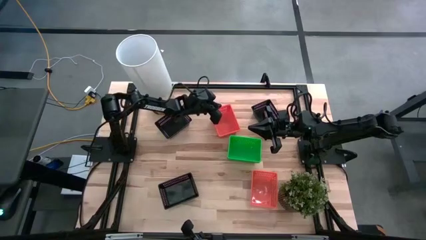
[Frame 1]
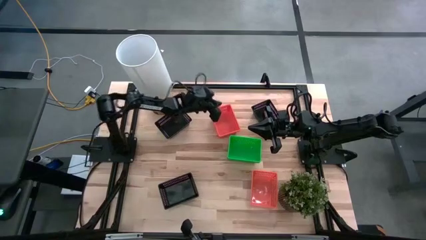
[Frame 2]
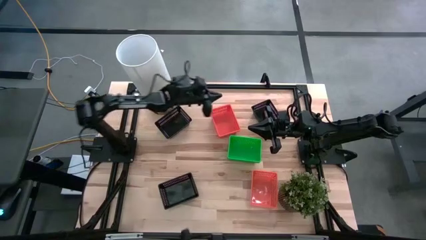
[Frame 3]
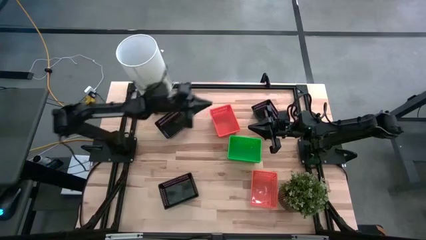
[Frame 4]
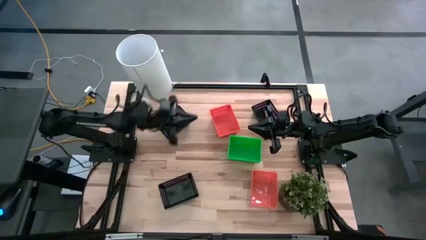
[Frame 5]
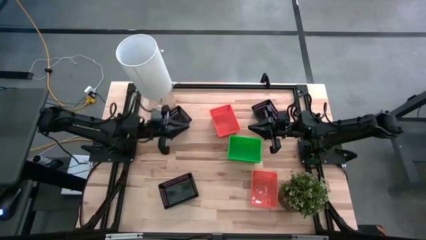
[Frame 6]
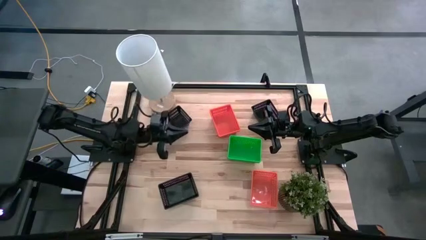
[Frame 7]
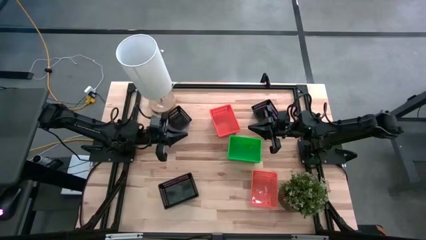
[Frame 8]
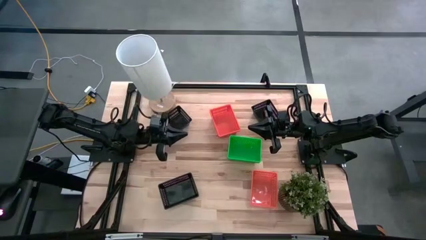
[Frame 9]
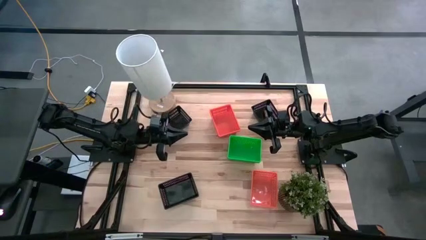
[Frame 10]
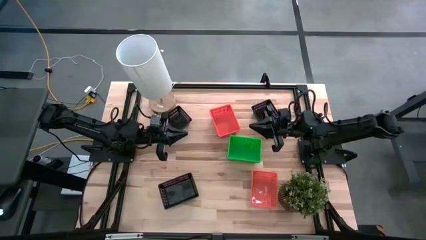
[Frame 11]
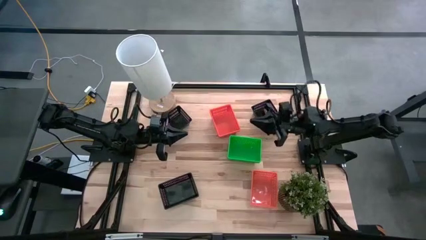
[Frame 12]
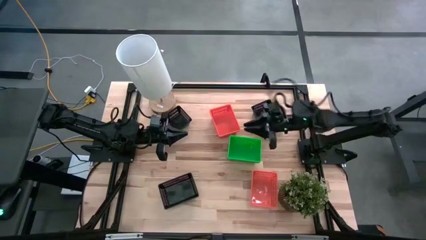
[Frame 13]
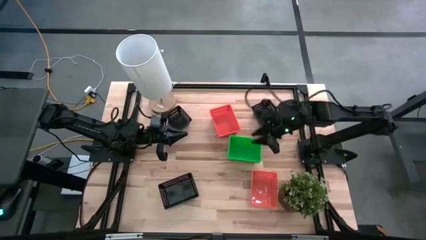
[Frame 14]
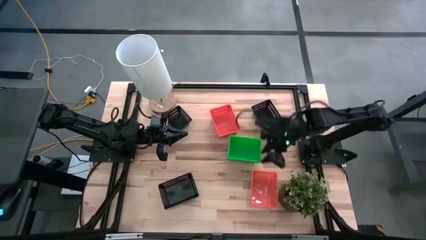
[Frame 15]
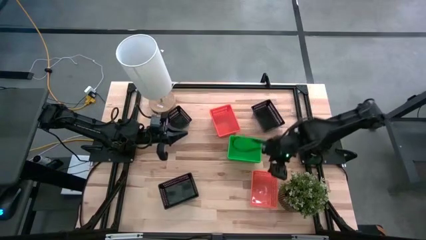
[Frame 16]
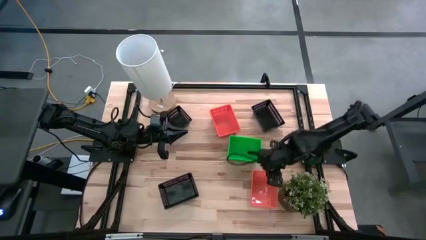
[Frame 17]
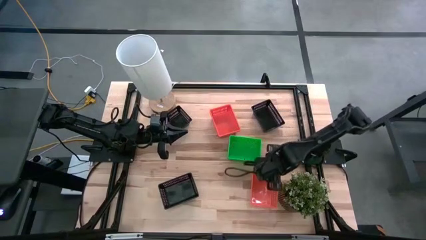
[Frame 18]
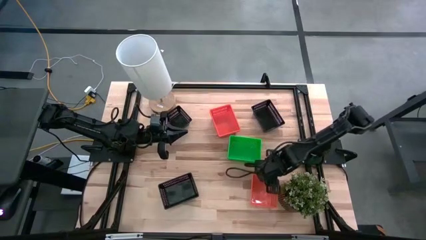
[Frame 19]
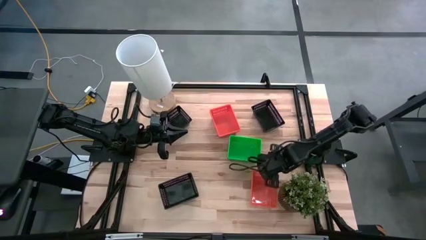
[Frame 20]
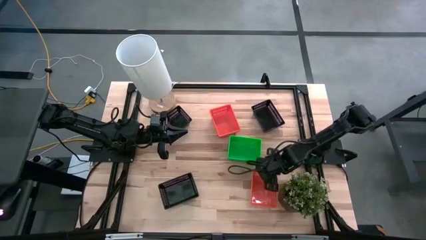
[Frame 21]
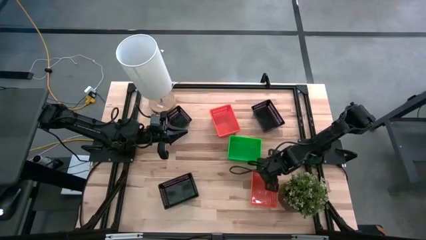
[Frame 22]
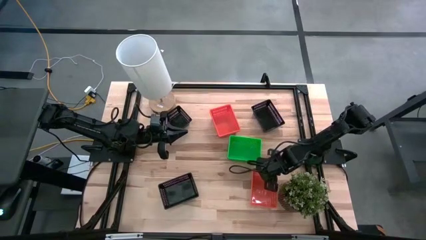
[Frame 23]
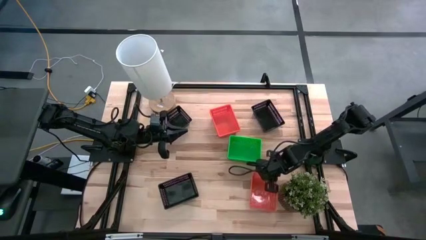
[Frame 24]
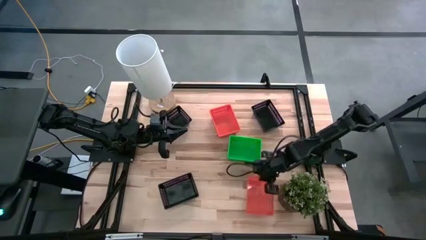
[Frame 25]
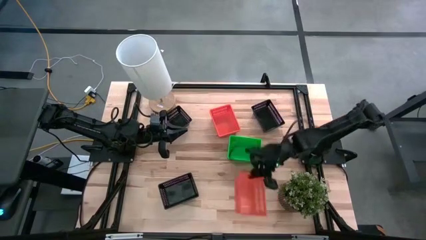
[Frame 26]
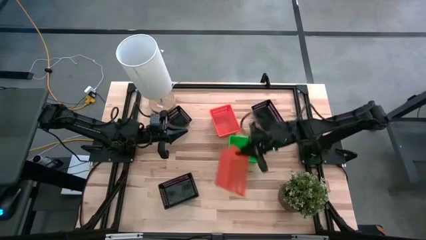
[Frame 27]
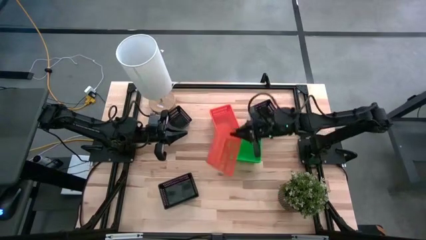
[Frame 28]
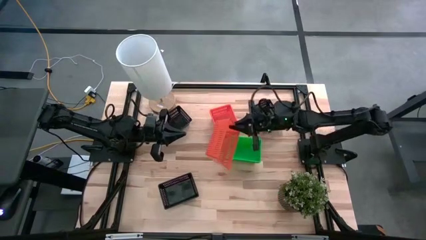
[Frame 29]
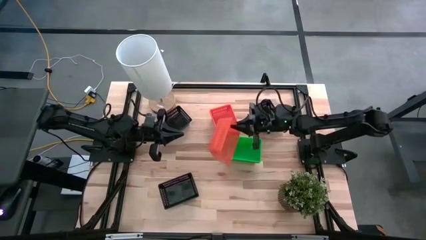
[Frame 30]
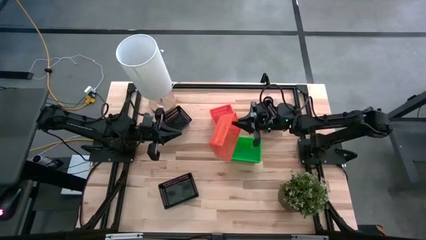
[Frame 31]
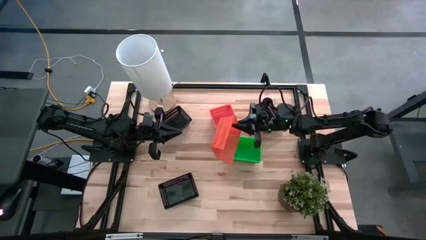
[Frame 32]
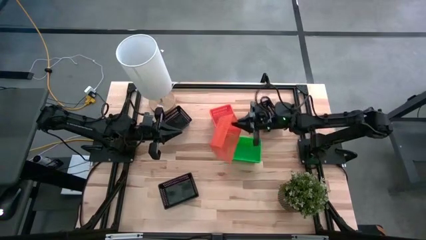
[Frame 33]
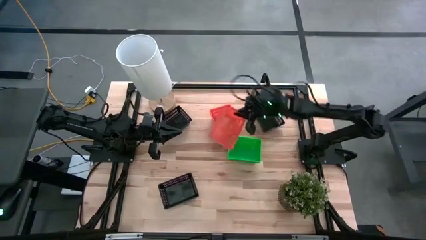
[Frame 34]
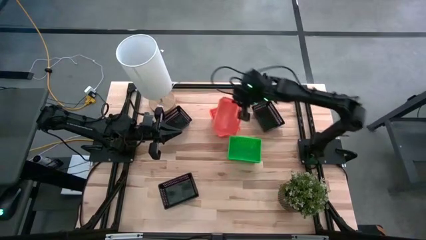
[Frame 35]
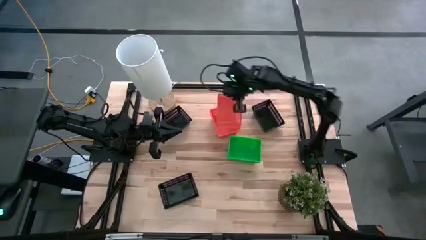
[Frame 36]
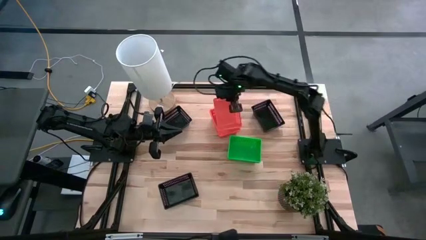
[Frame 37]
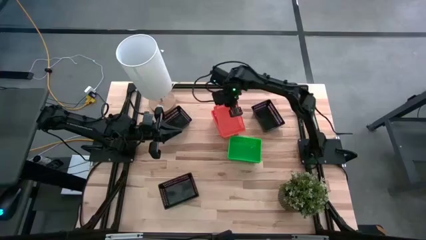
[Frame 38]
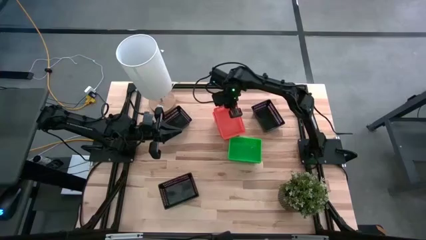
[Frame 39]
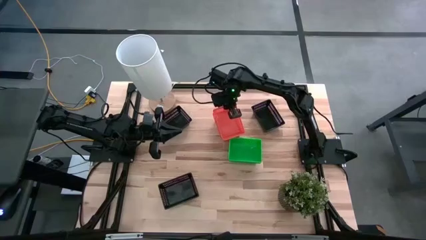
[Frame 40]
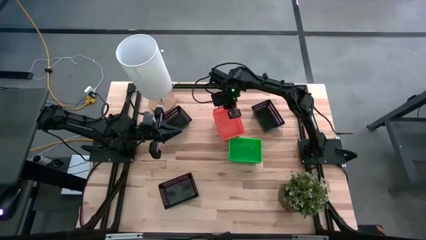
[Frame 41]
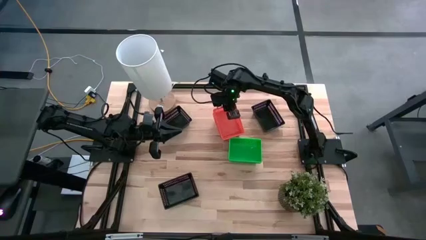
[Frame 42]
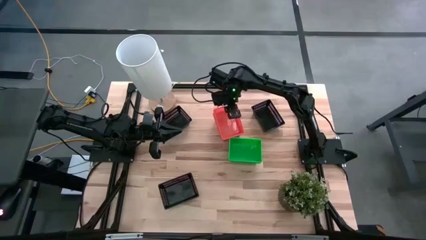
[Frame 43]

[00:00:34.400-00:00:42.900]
Stack the bottom orange bin on top of the top orange bin

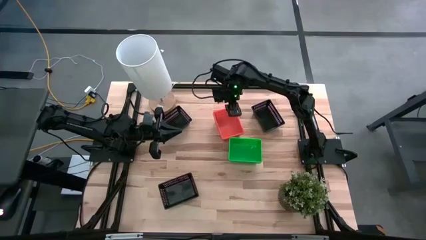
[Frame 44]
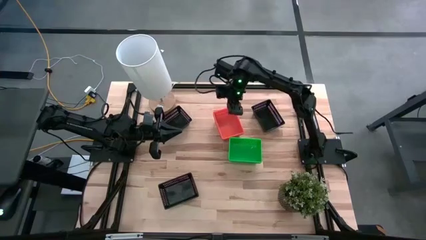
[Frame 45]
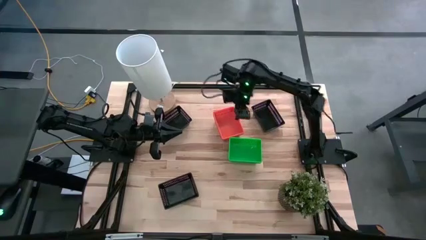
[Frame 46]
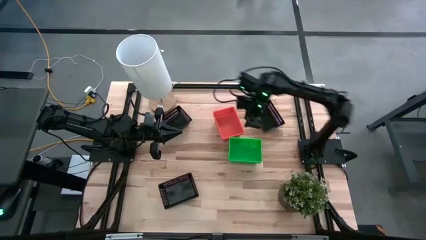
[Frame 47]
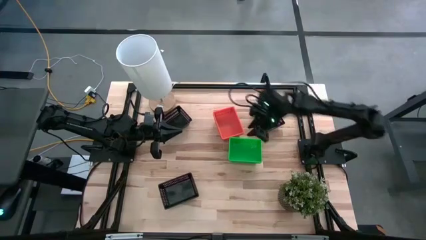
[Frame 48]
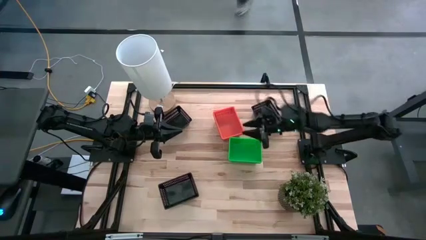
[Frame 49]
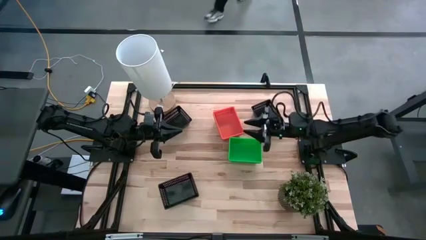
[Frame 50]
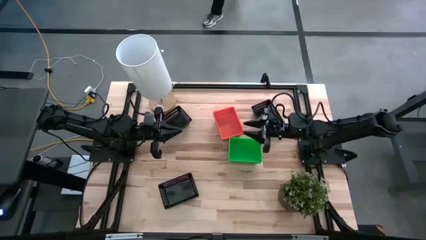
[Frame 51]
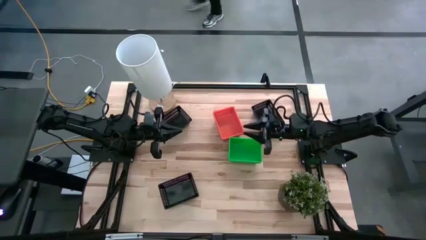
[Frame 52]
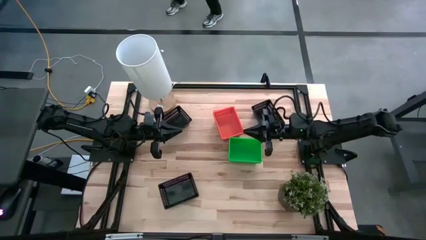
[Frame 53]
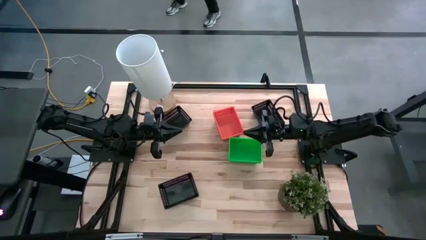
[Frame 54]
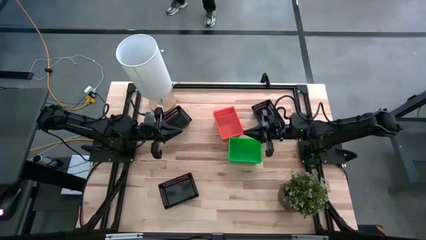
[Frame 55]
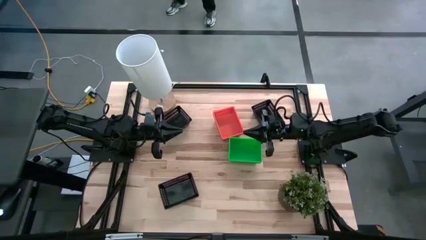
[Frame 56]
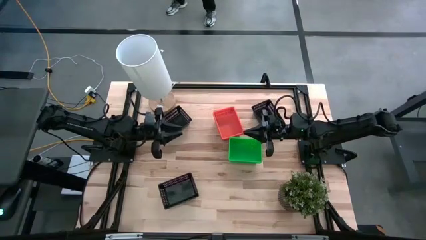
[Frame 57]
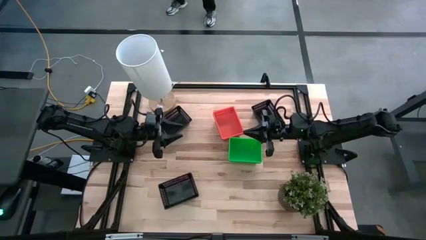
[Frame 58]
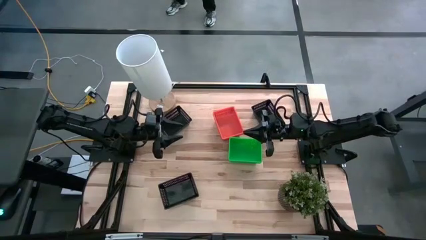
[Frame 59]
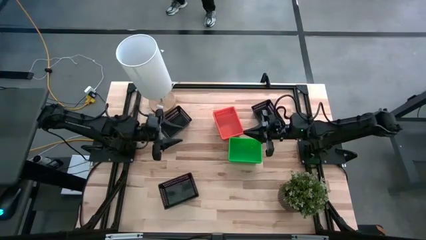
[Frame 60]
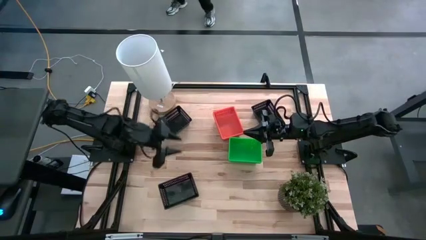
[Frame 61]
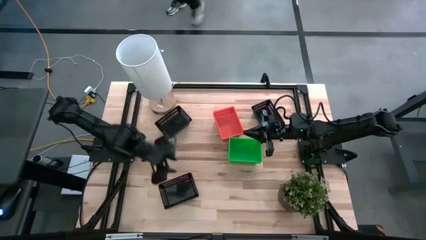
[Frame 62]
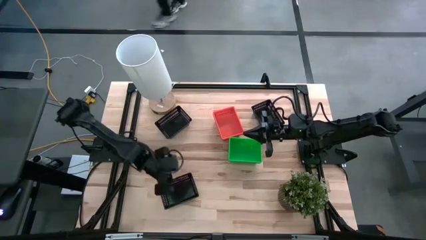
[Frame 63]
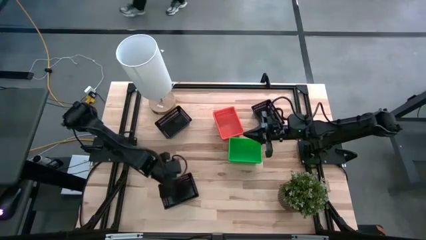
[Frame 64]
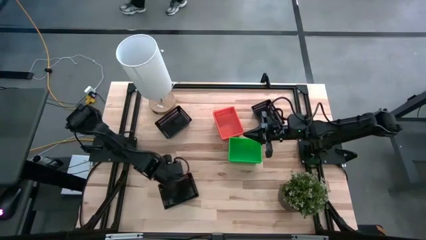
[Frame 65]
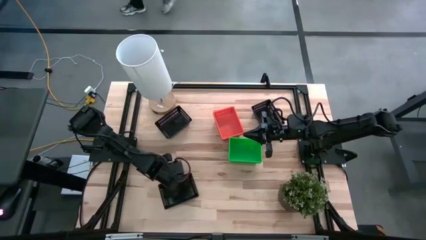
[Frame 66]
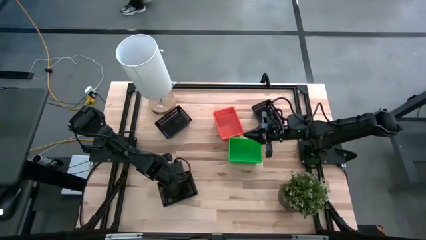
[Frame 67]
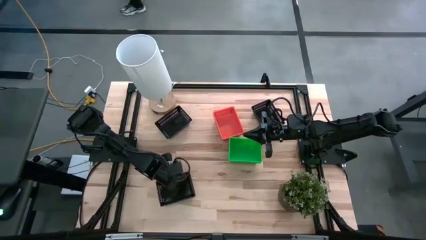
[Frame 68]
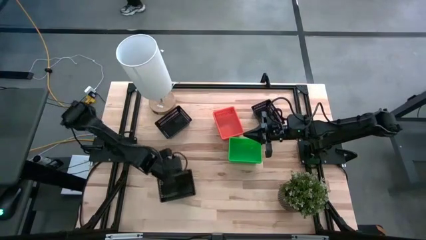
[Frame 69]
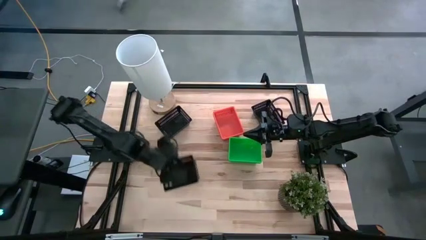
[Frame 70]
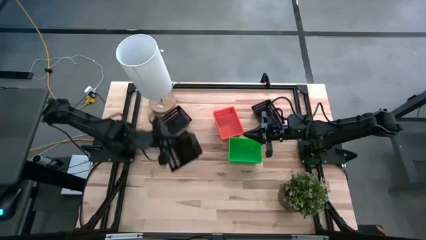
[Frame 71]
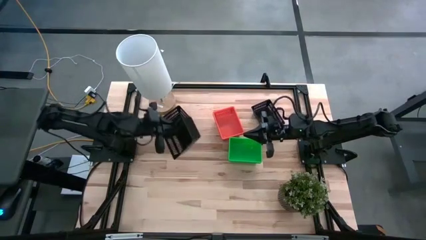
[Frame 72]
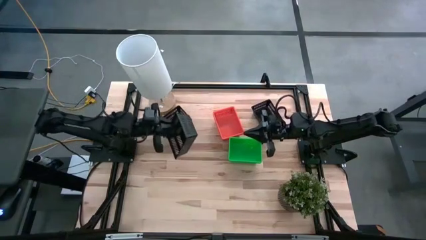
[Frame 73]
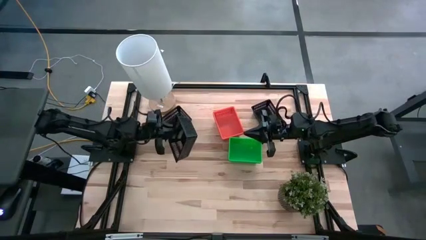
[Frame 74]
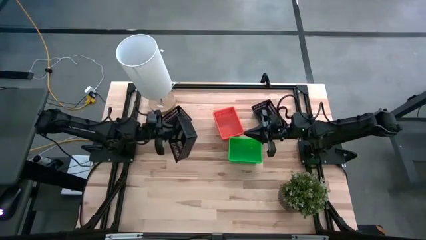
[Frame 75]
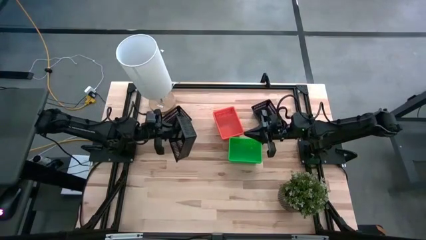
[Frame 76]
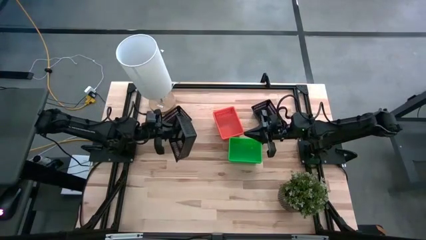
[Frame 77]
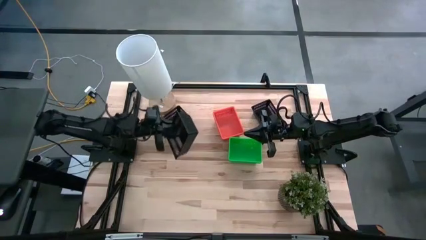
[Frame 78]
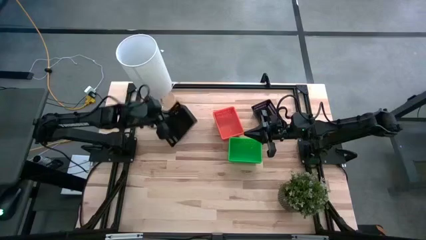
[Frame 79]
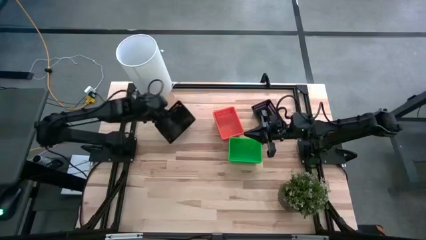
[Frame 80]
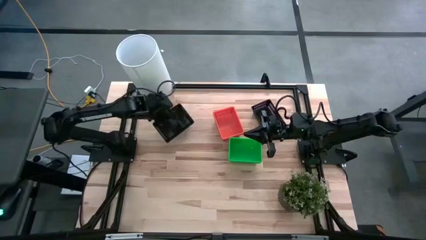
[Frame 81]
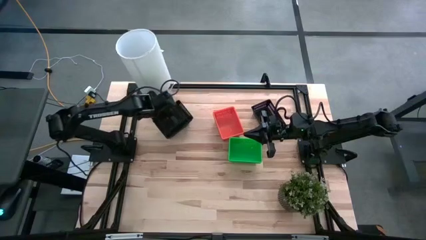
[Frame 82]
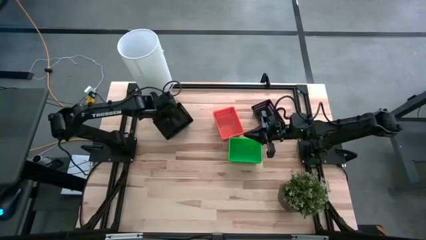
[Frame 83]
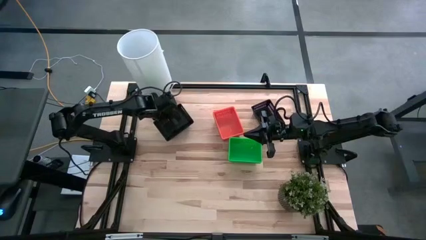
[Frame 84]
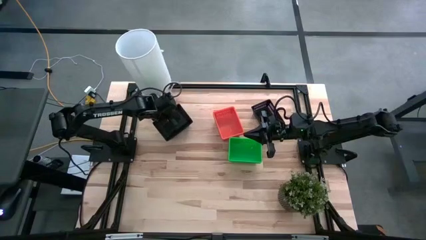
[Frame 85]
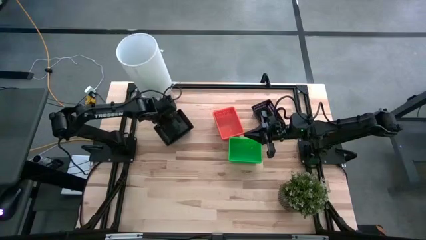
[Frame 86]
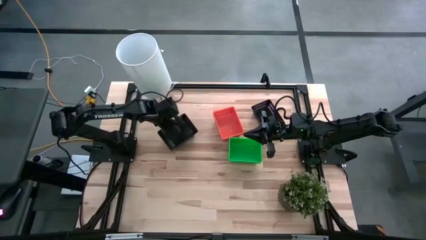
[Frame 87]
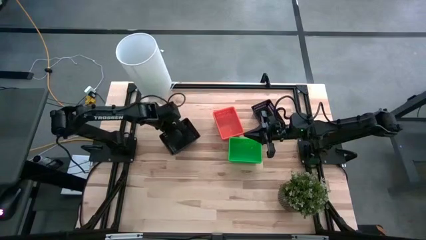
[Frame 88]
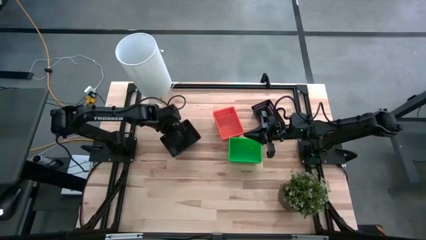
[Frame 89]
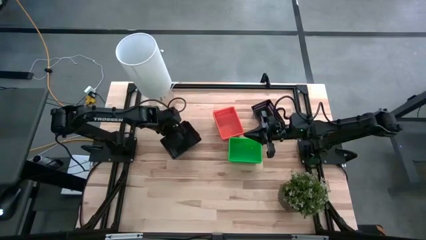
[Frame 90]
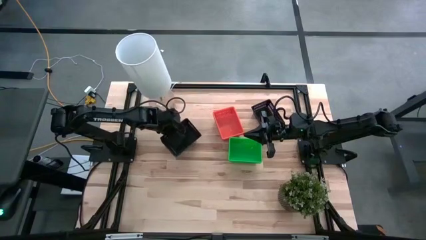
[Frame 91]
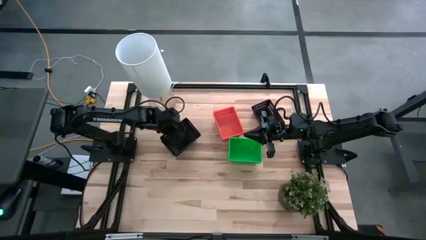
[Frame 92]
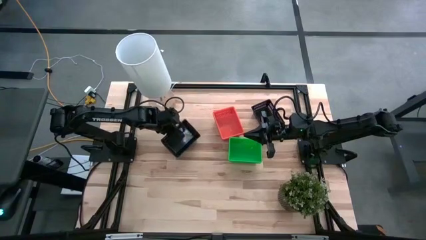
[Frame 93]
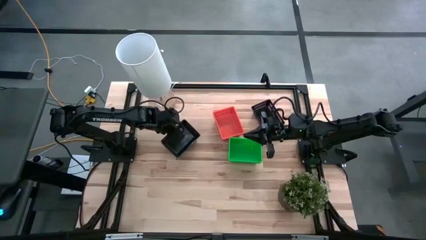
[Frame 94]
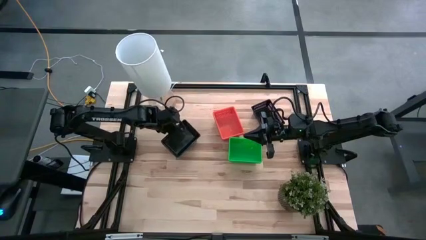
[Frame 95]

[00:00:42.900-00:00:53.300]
Stack the bottom black bin on top of the top left black bin
